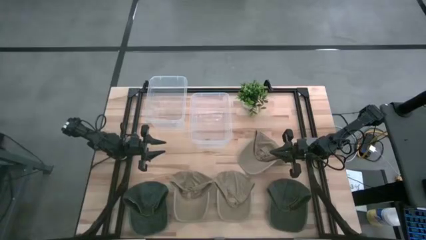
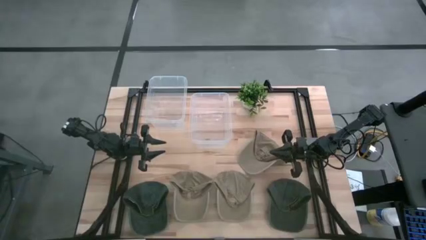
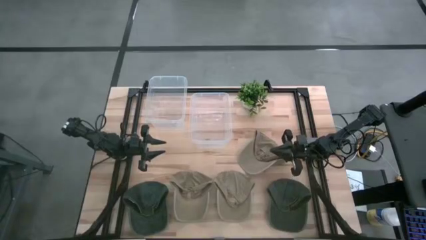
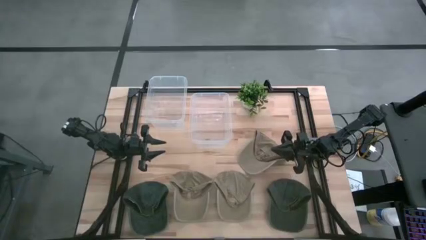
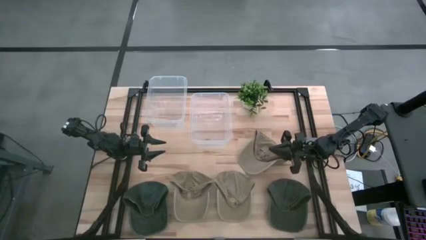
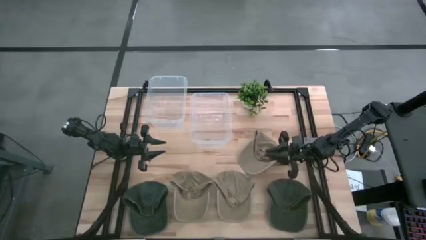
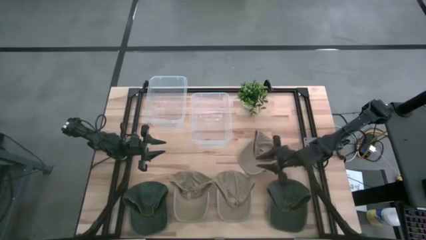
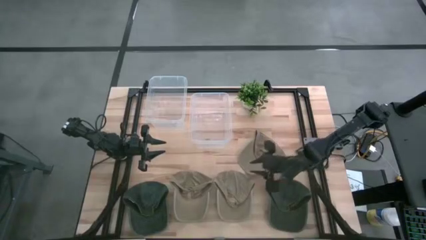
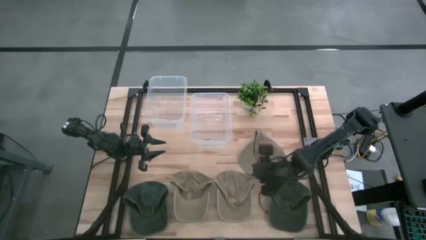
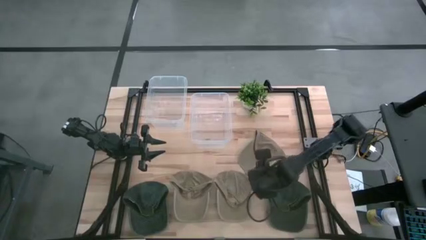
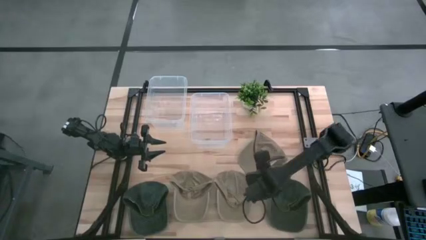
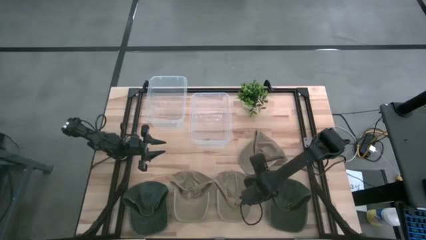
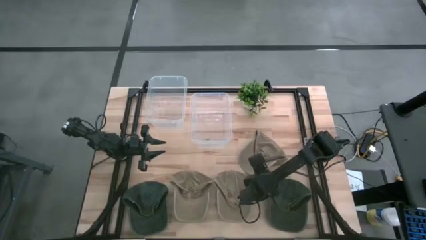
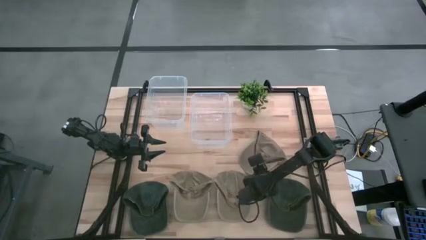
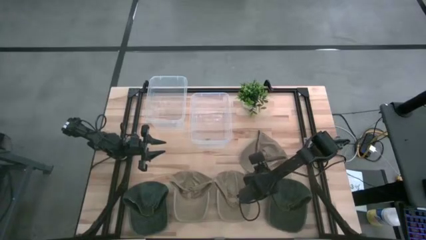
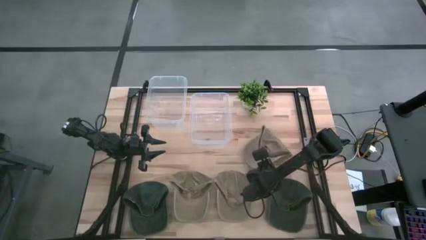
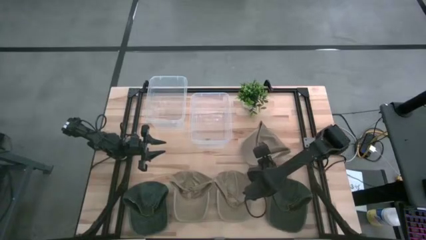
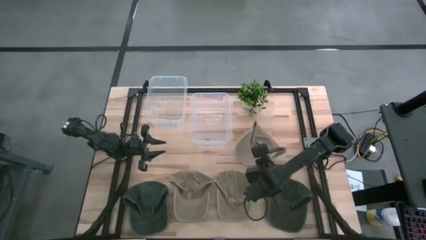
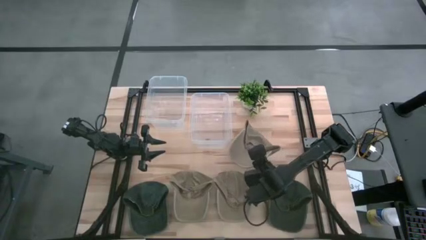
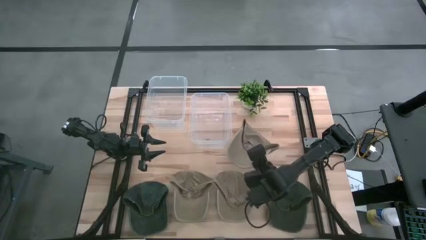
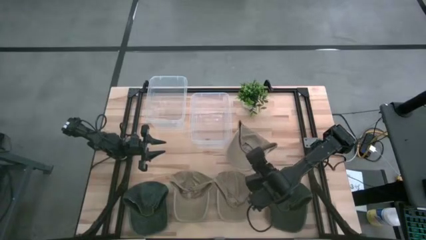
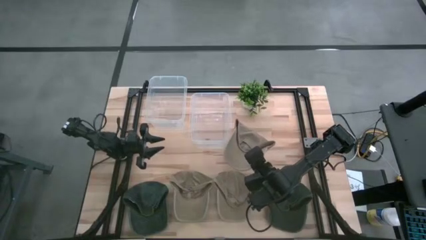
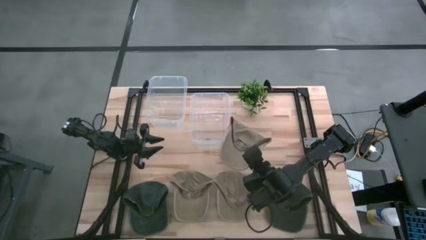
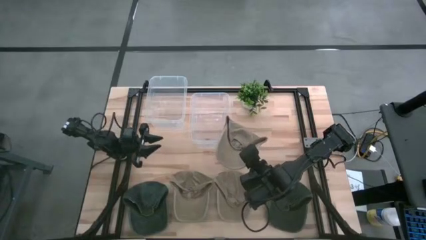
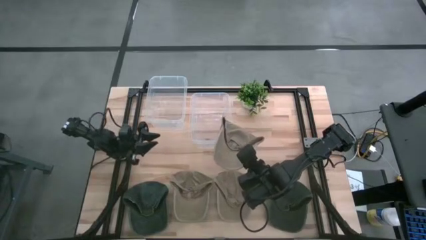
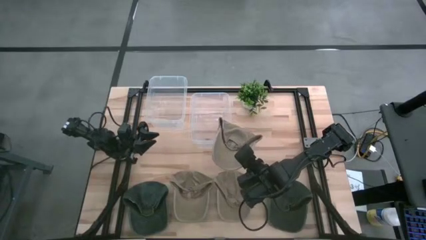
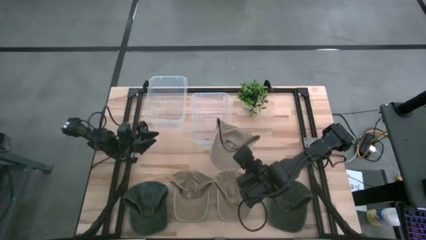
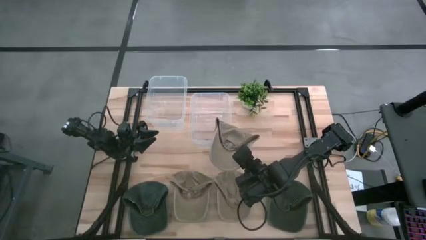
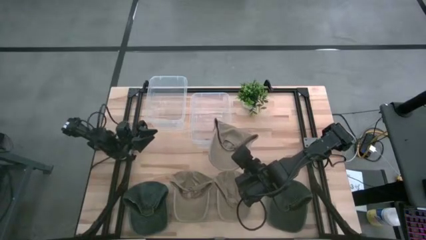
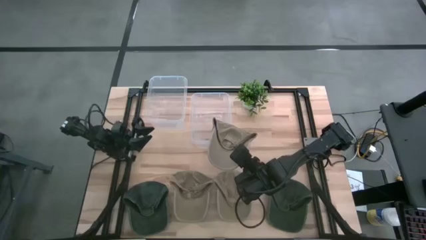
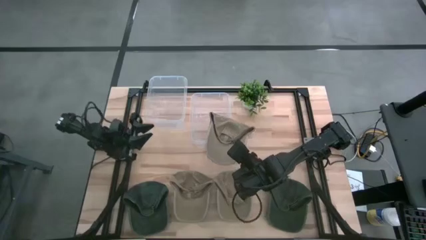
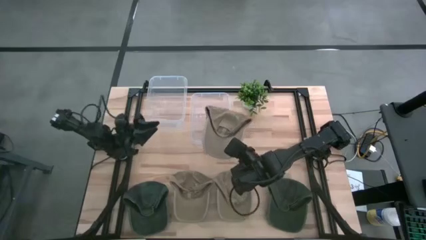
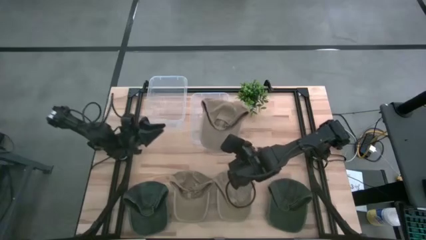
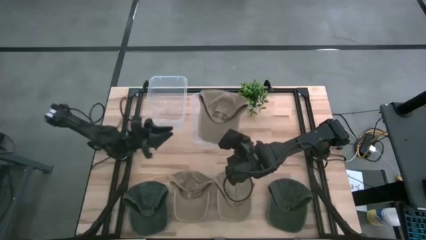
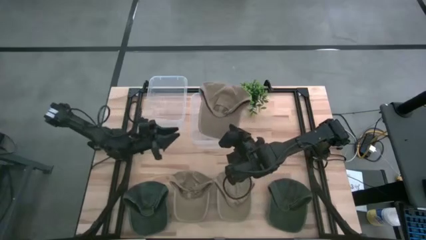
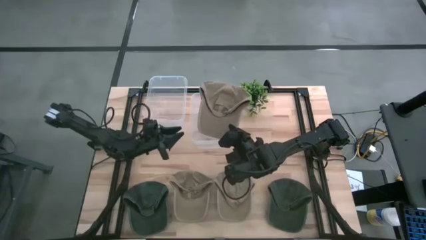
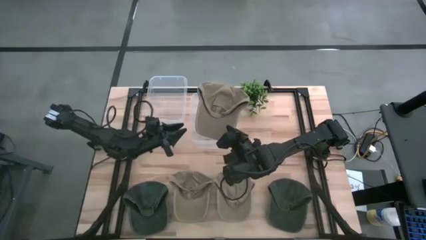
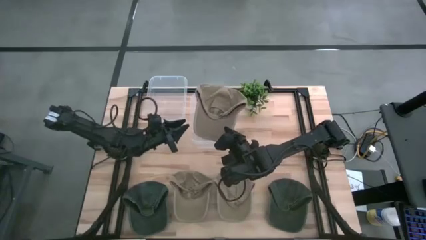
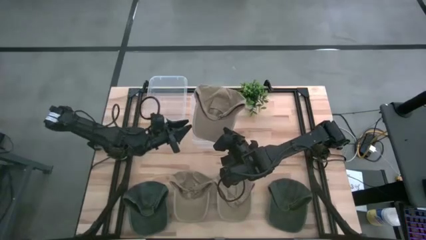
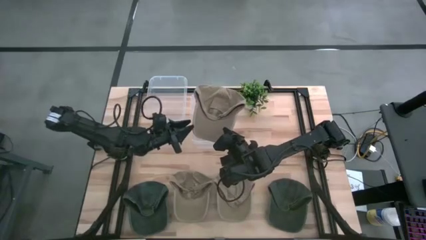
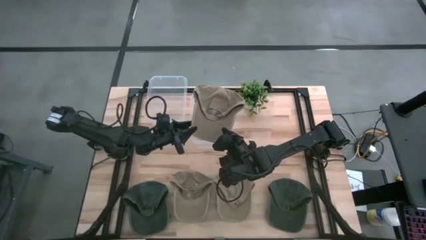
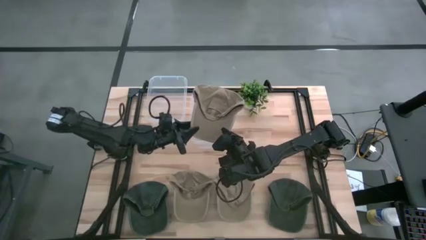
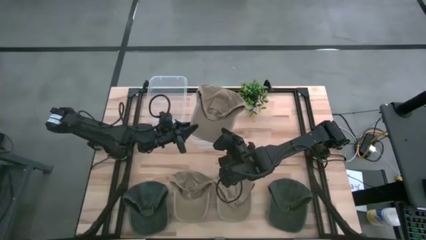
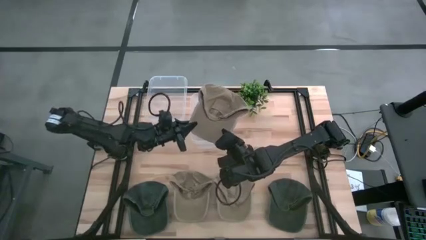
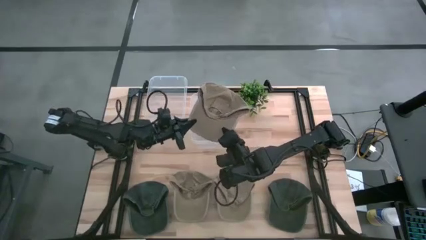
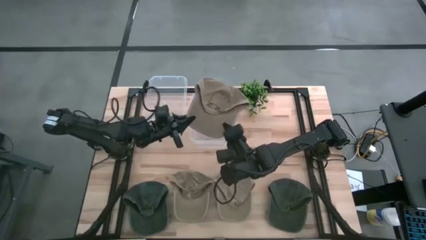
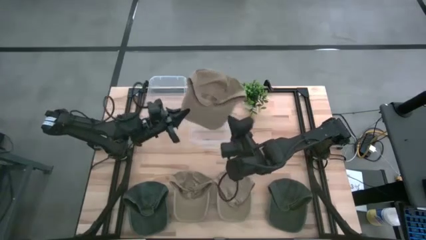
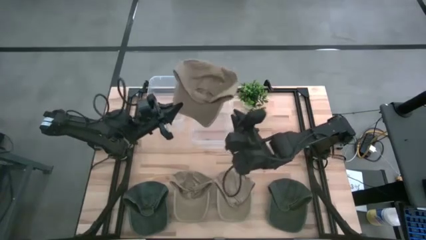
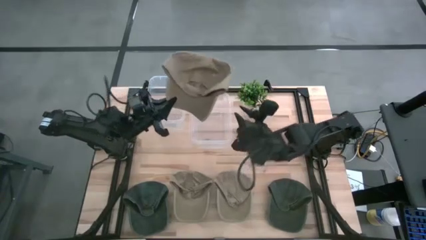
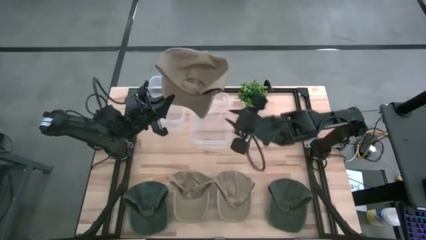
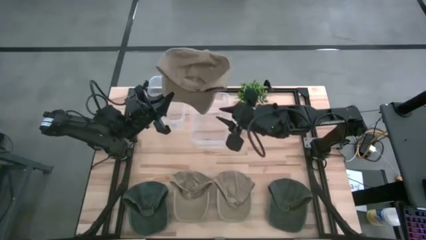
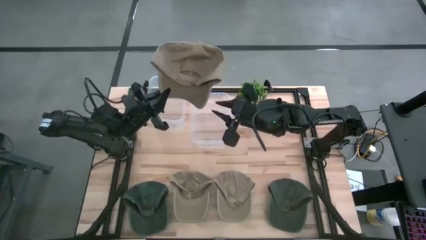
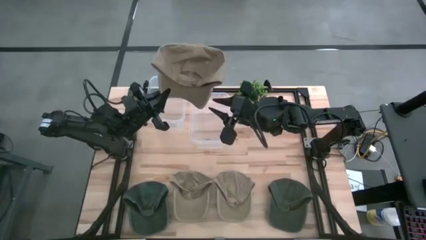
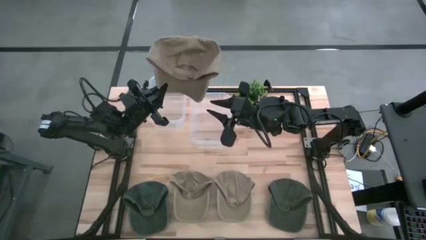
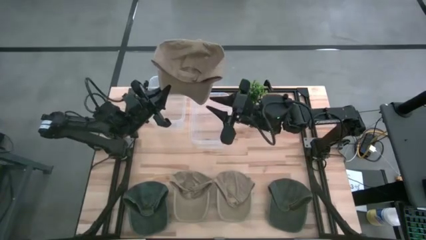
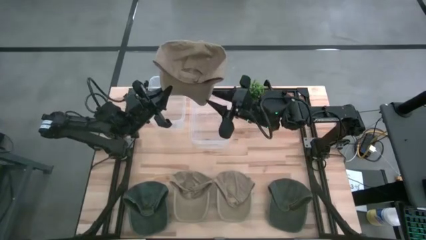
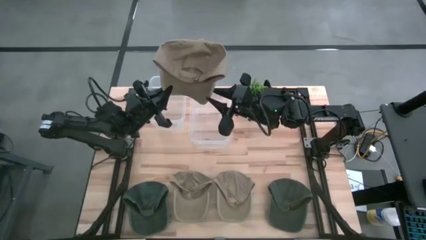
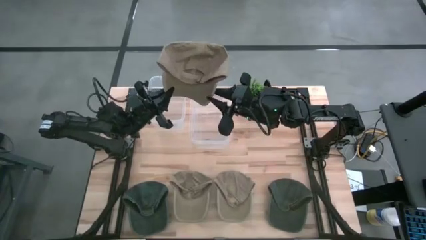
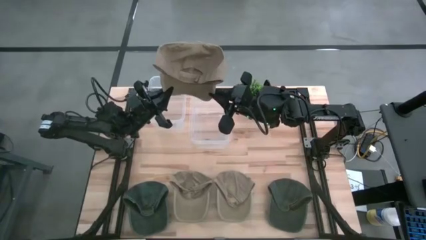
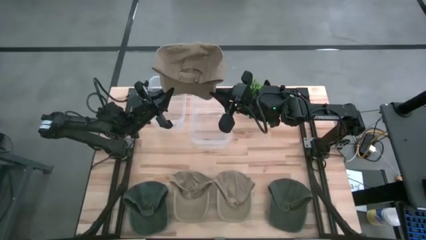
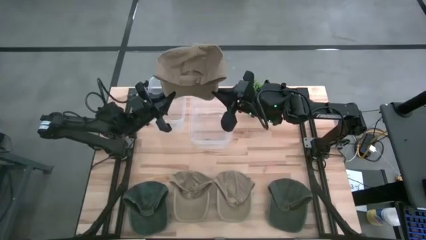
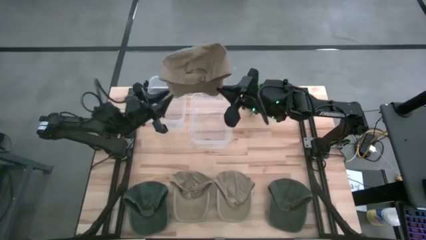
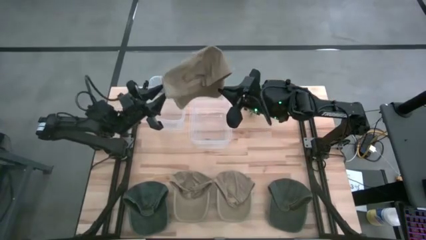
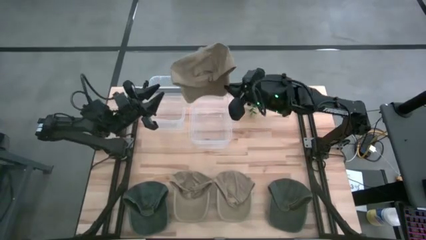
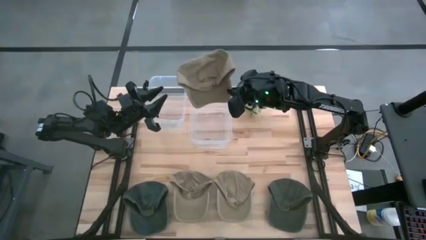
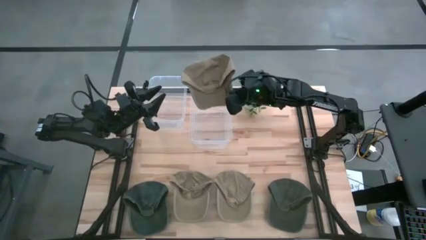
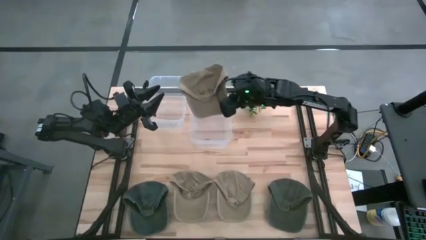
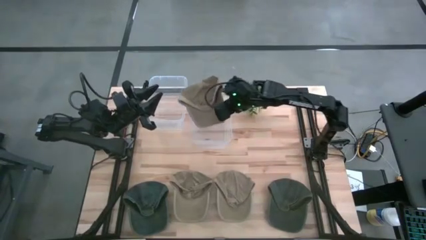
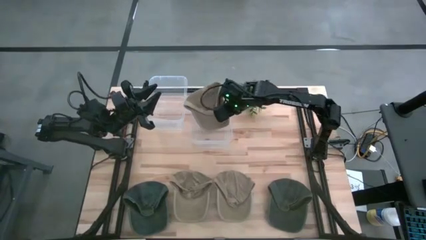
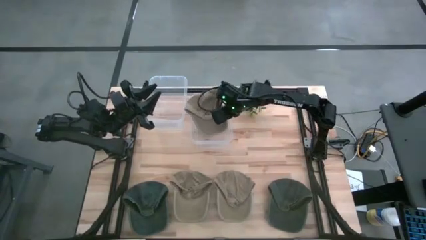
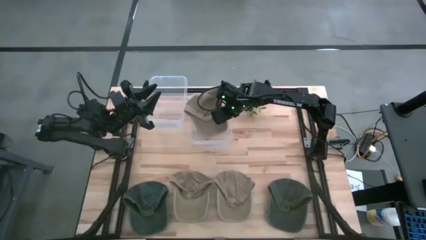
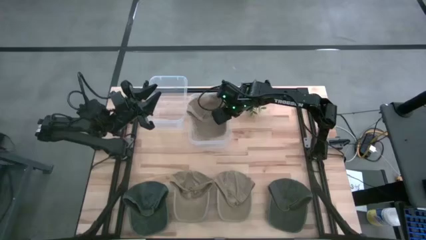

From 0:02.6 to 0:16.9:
Task: Pick & Place hat
Put the top brown cap into the right transparent bin
